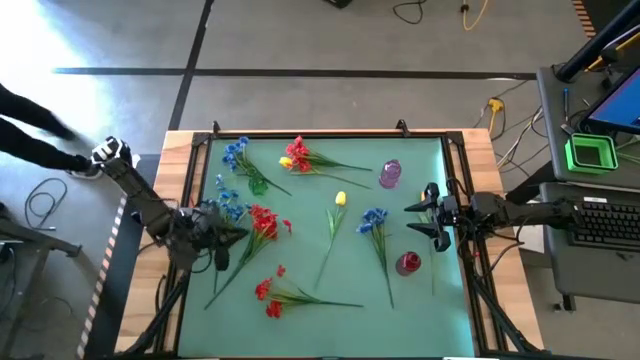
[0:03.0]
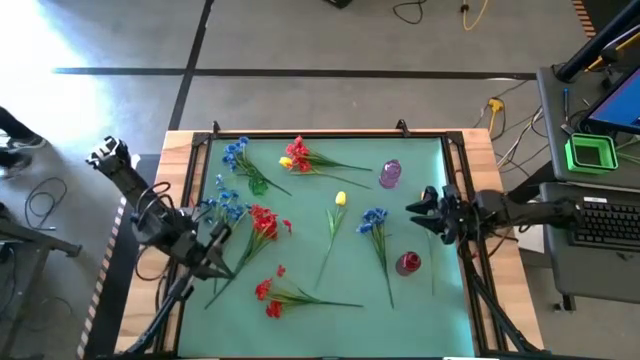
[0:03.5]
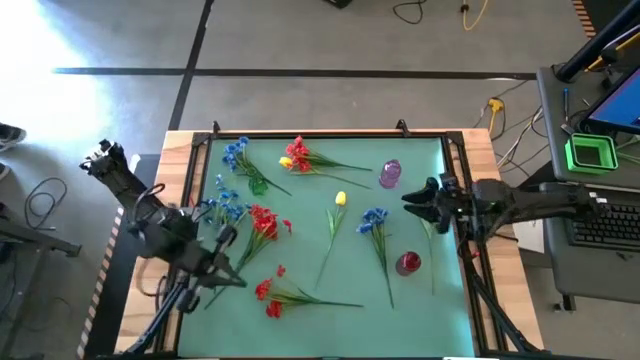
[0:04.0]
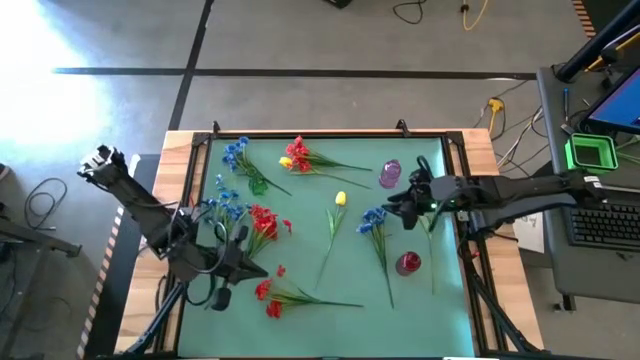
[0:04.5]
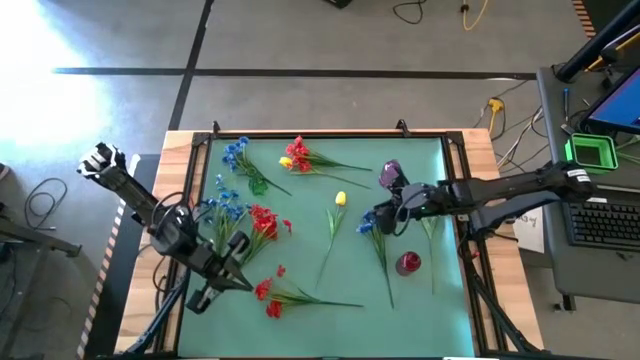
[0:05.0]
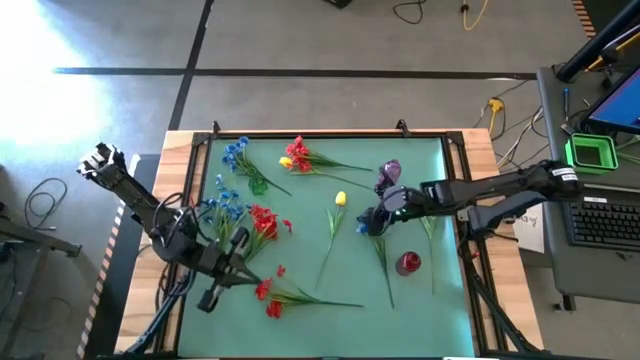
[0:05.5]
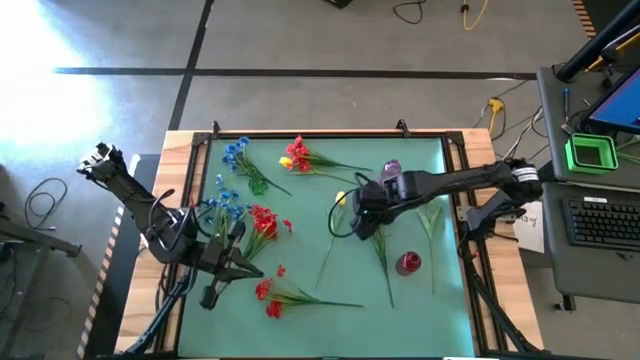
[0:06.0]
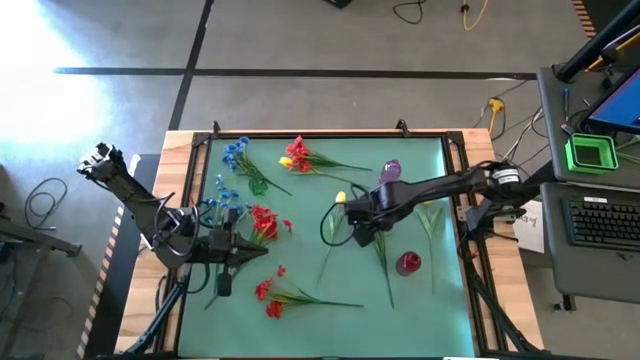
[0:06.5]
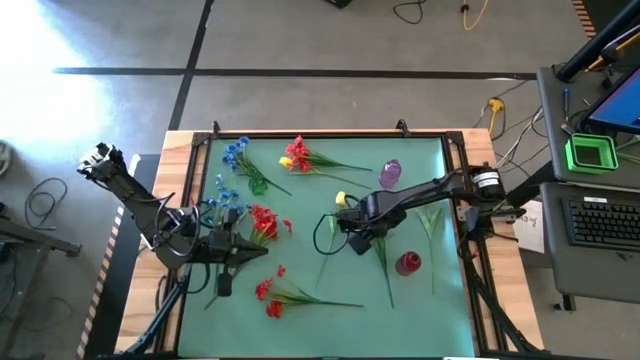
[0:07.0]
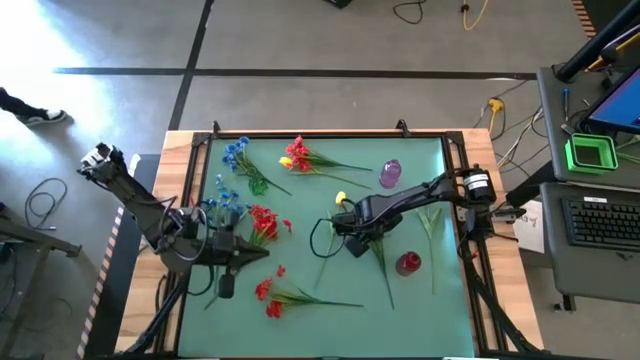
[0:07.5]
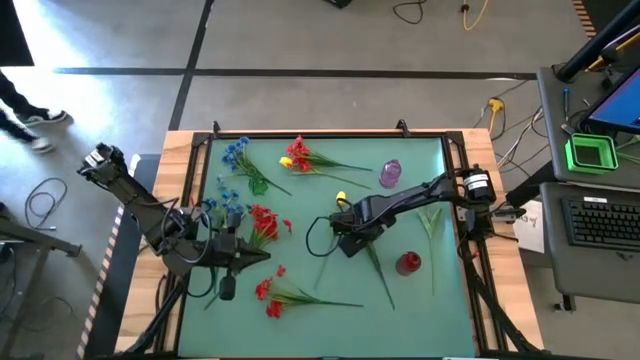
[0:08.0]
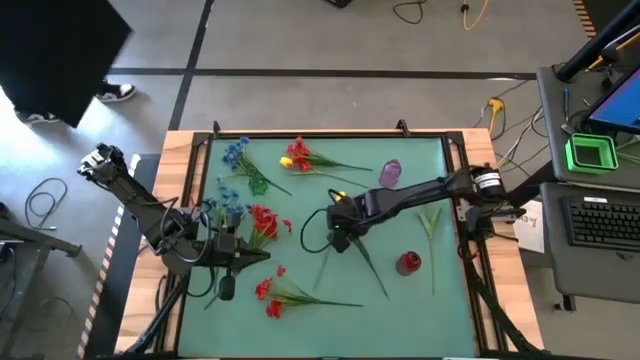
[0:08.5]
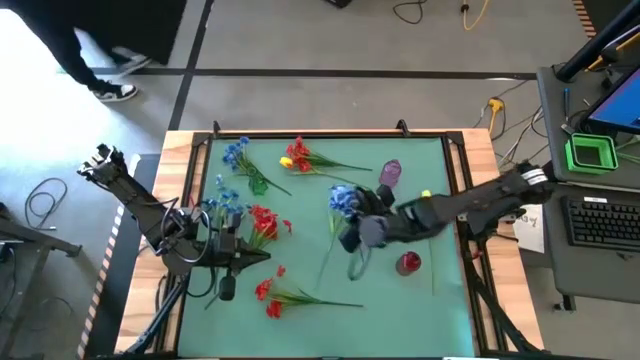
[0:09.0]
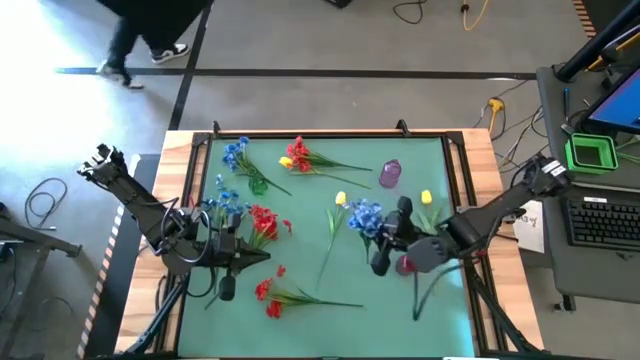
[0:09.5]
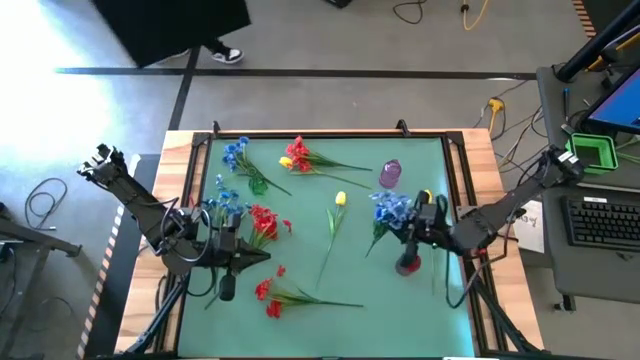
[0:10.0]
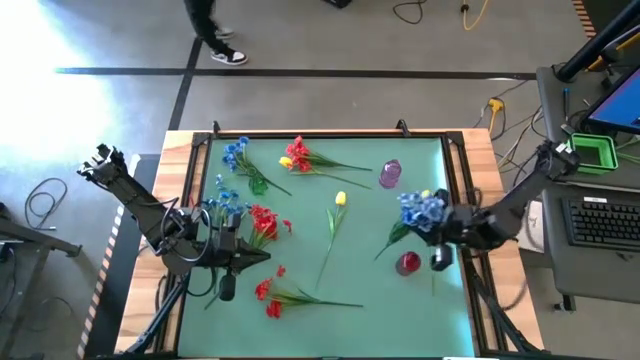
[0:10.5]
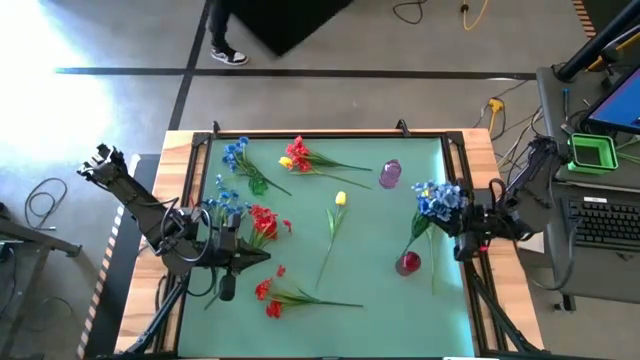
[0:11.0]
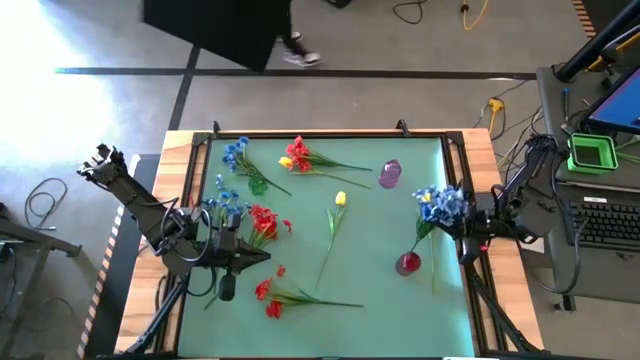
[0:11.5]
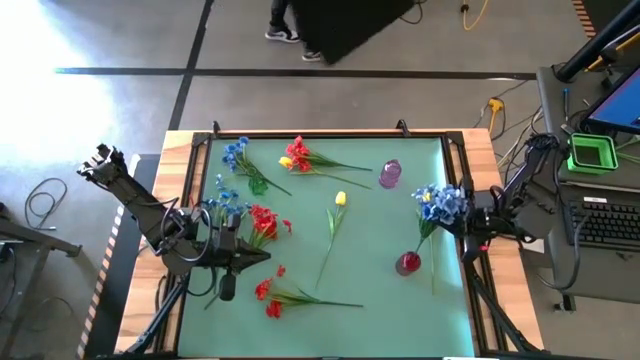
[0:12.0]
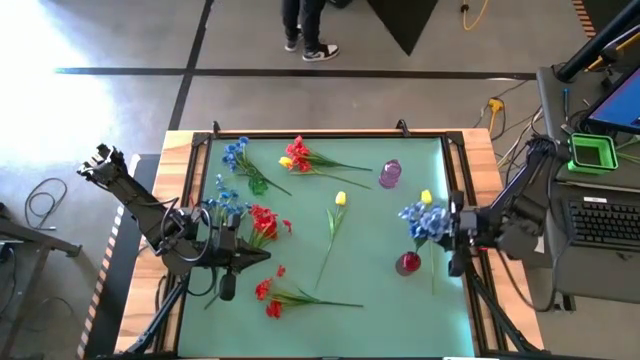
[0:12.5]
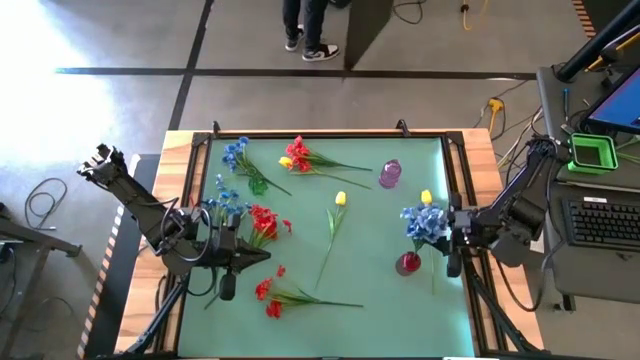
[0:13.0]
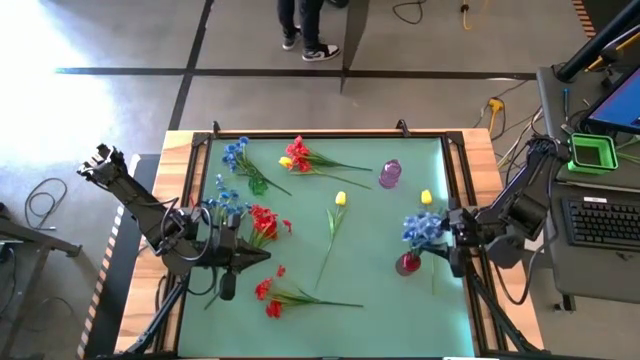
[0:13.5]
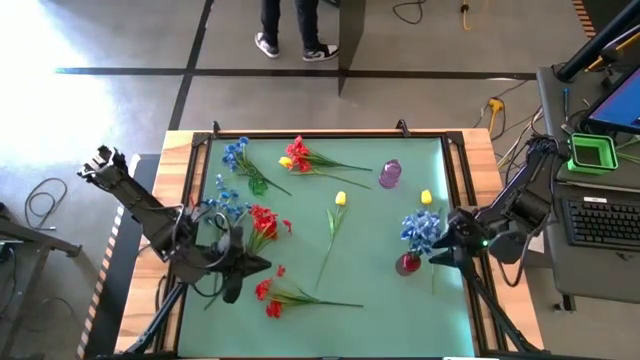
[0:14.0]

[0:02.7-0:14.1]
Task: Sort flowers into vase by color
Put the left blue flower into the red vase

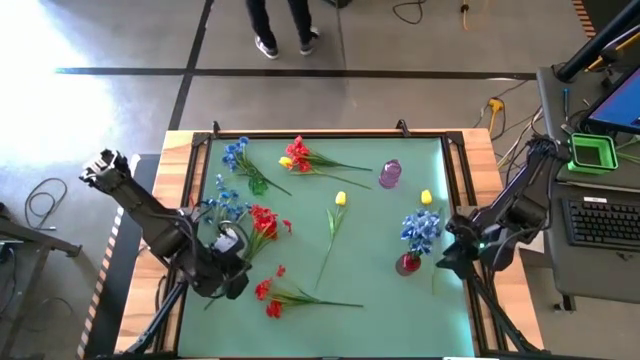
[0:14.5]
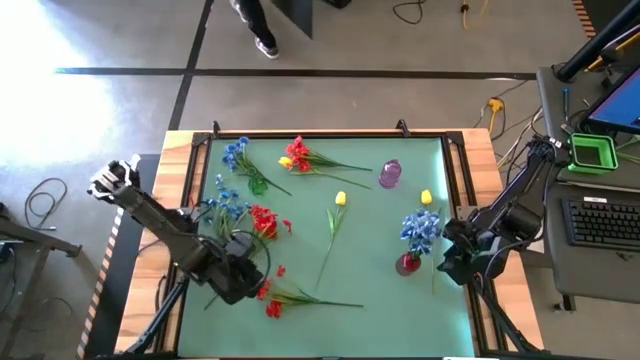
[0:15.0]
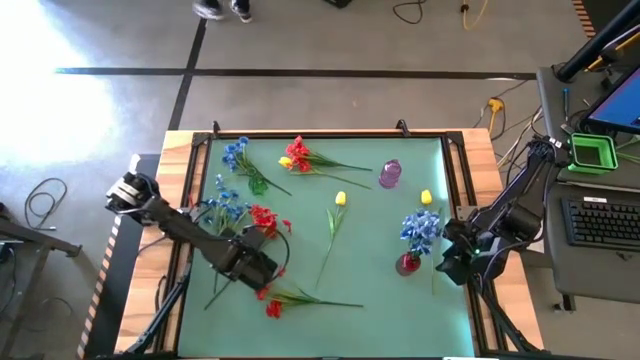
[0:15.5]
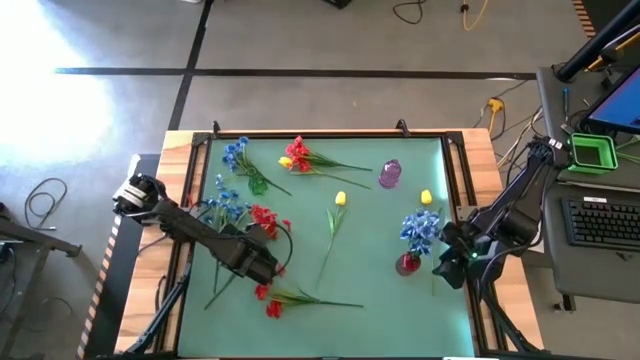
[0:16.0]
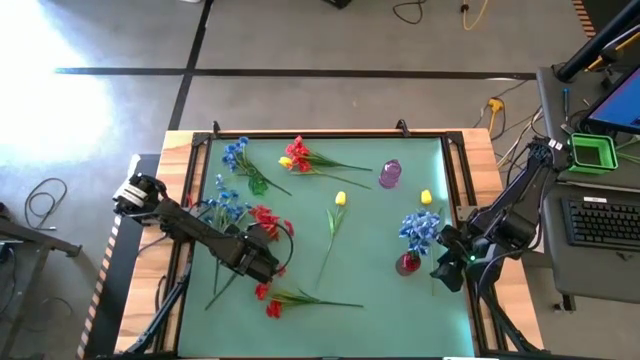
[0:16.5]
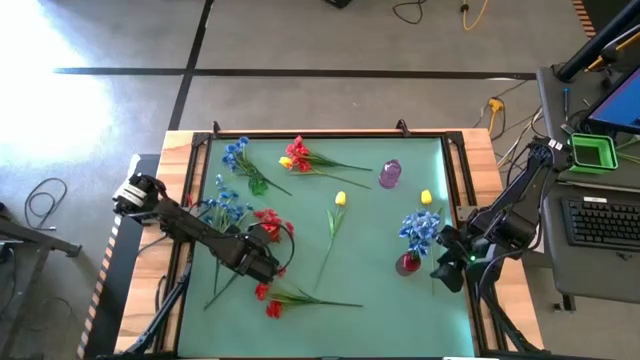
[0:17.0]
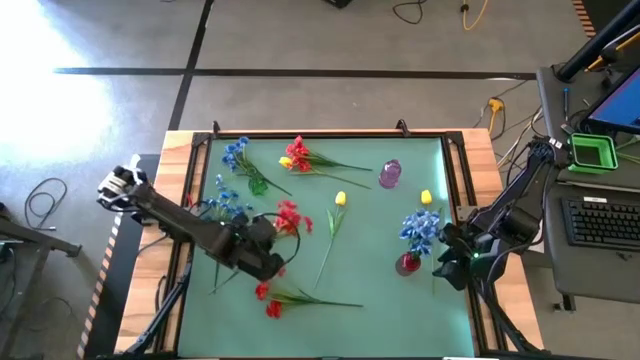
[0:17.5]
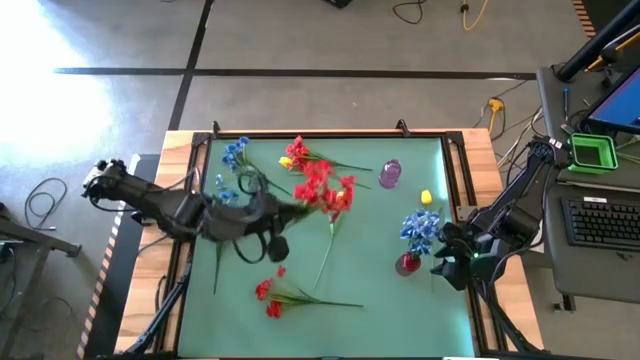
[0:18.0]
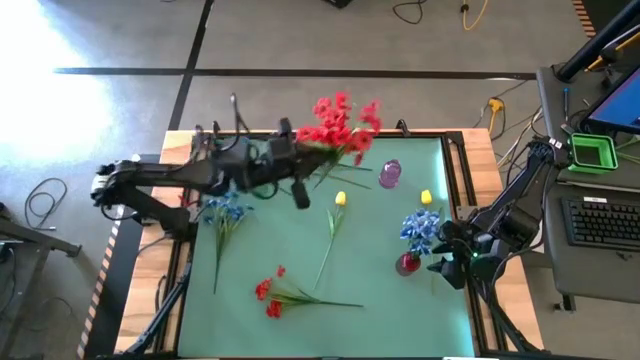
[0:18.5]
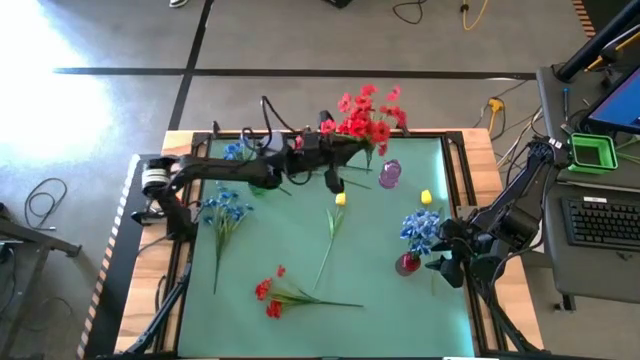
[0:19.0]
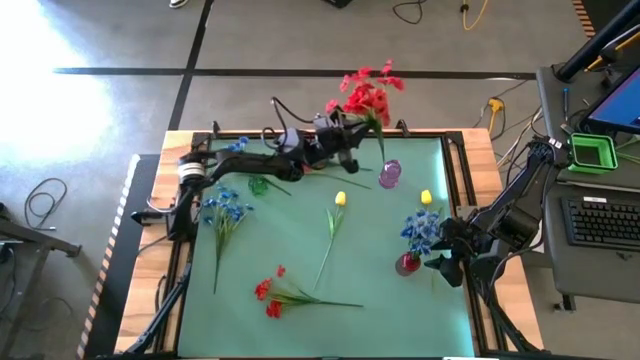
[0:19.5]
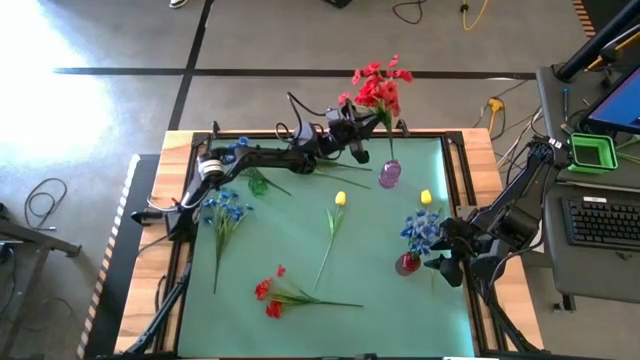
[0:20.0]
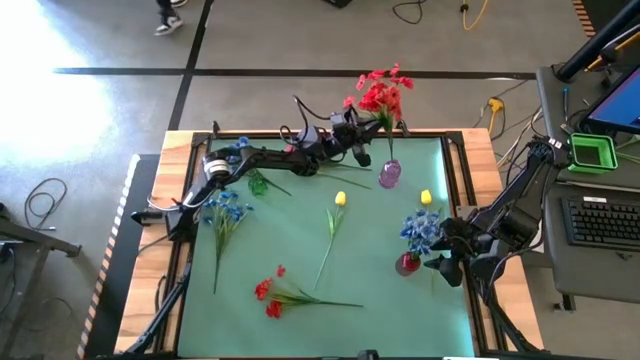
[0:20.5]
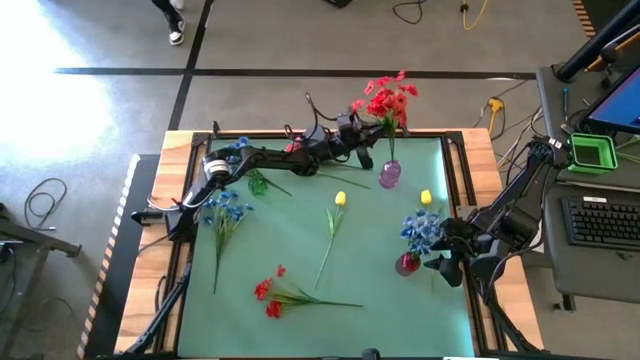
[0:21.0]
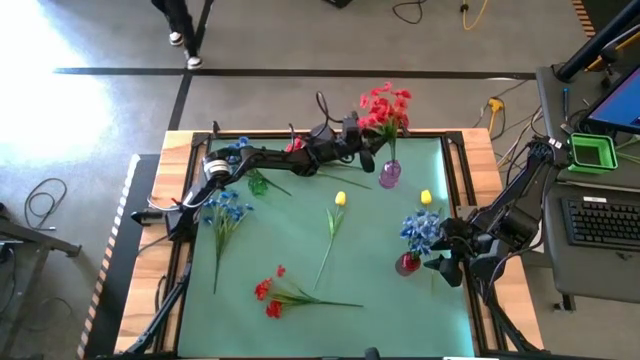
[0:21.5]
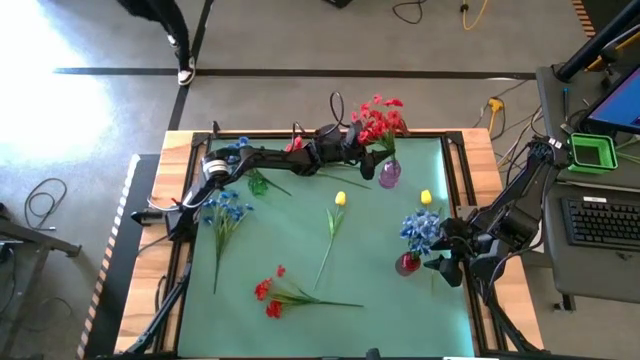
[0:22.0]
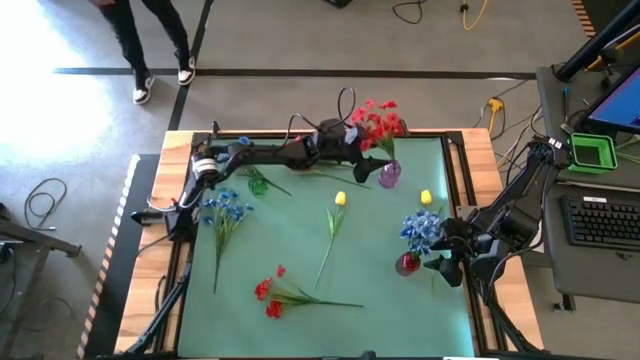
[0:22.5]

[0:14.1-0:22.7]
Put the middle red flower into the purple vase
